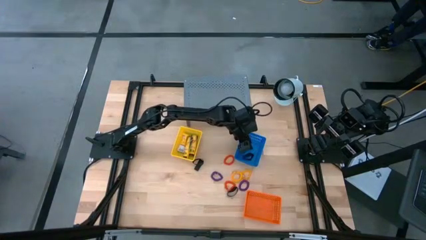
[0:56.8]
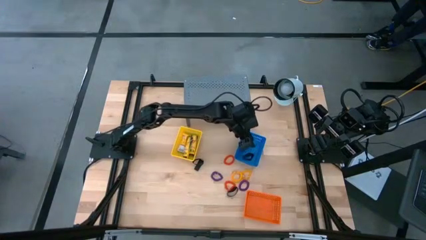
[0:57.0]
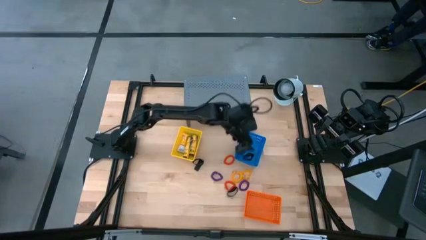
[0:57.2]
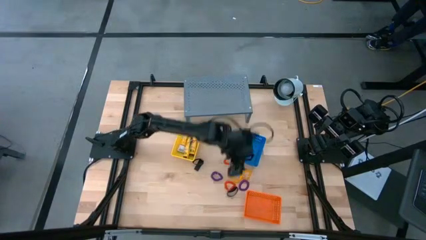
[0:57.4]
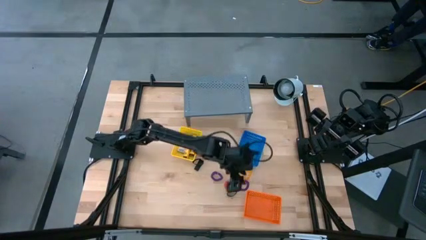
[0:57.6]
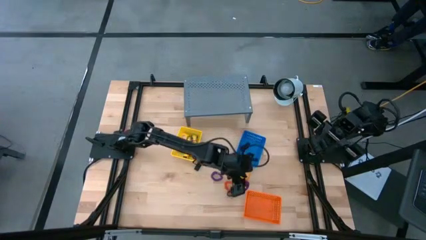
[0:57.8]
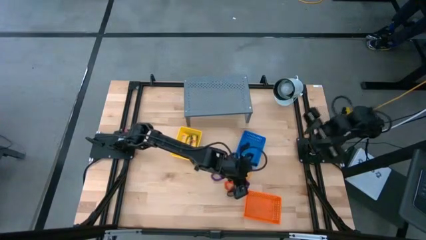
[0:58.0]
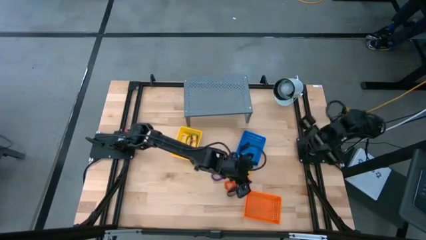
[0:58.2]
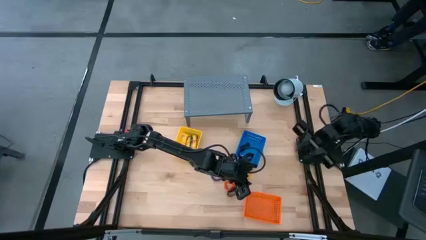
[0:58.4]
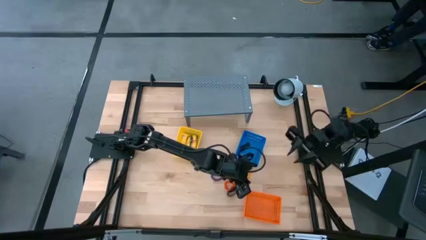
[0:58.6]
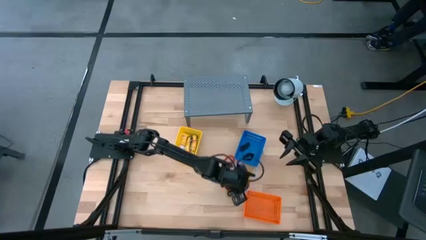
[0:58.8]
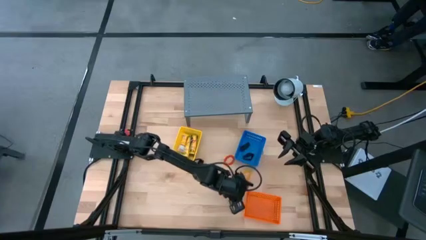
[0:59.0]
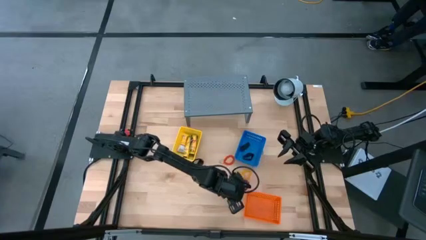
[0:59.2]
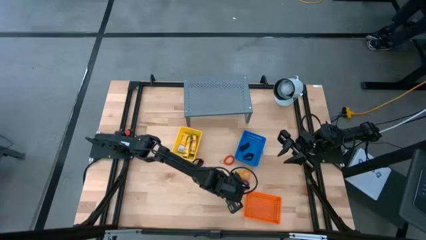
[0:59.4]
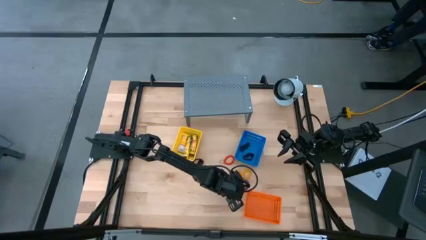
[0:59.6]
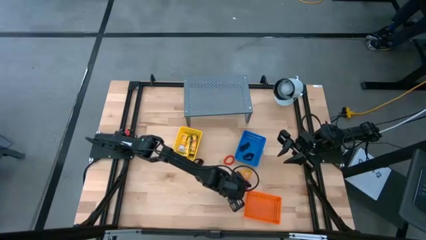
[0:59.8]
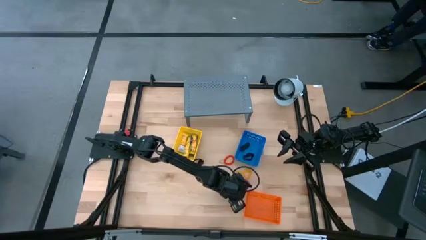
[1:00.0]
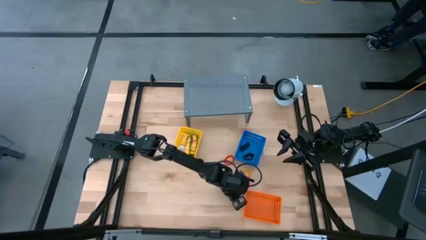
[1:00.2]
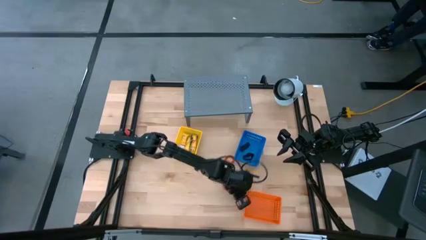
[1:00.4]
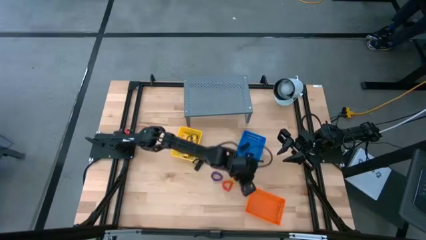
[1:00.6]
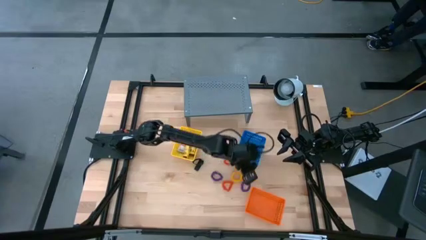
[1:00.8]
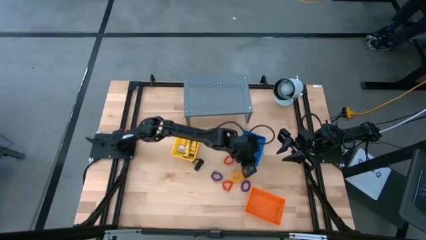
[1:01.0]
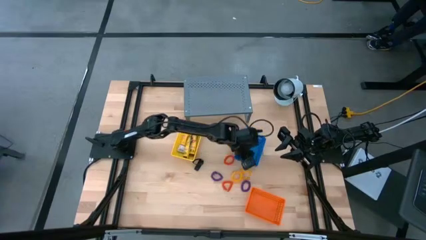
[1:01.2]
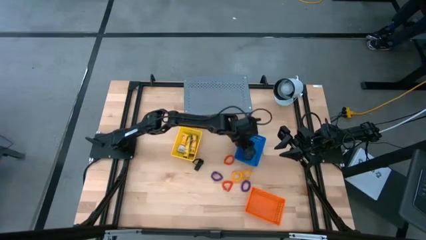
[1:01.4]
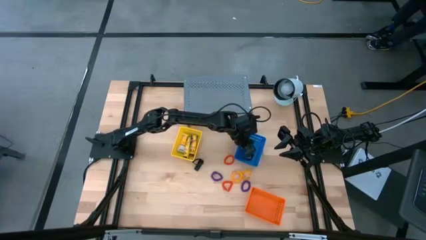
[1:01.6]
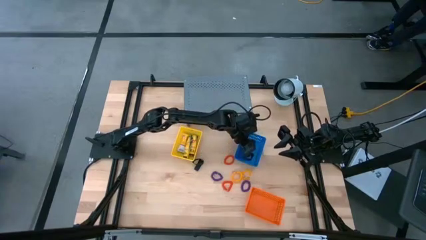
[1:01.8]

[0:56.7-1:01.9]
Task: Pick & Place Office Desk Supplies
Put the black rubber band into the blue bin

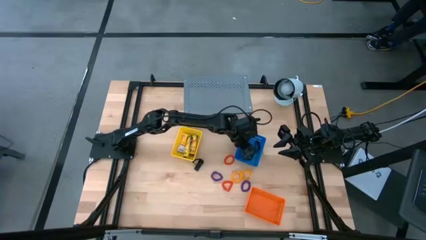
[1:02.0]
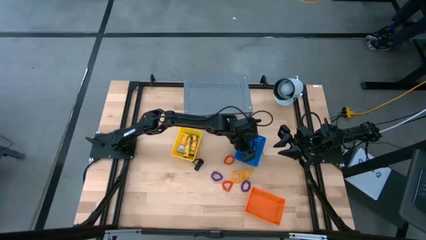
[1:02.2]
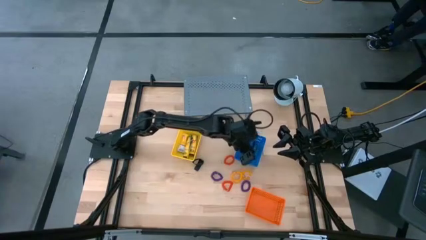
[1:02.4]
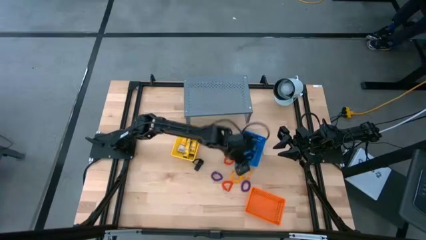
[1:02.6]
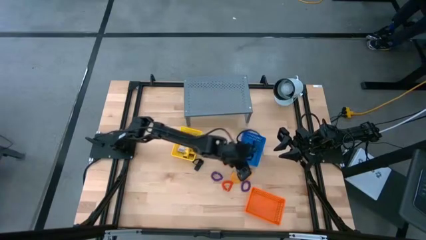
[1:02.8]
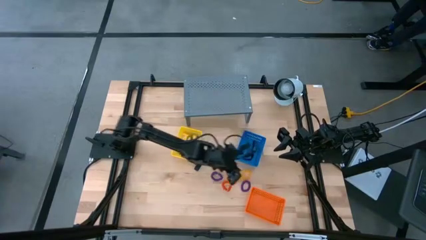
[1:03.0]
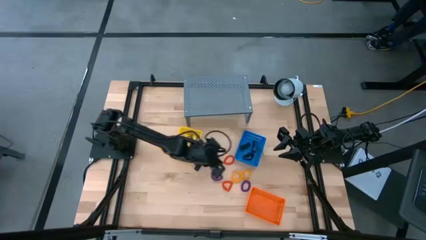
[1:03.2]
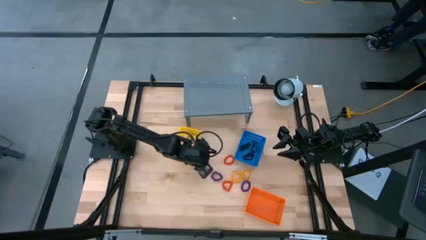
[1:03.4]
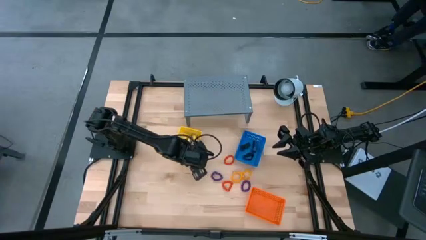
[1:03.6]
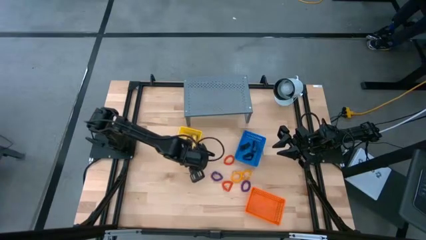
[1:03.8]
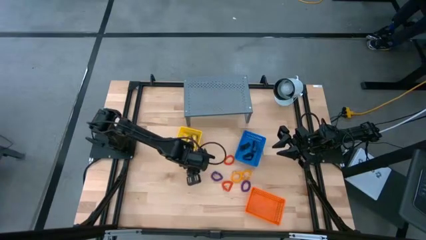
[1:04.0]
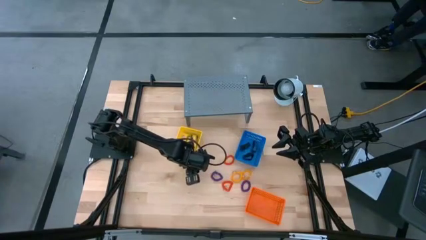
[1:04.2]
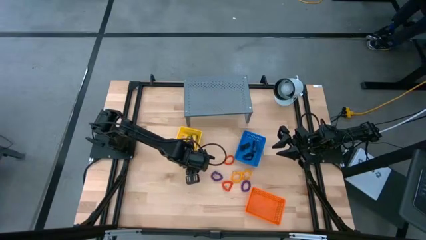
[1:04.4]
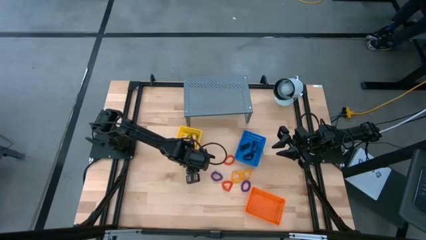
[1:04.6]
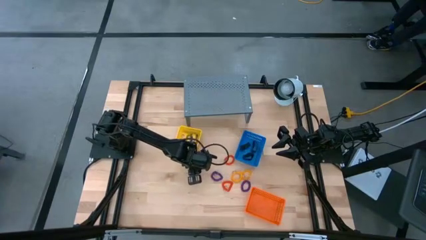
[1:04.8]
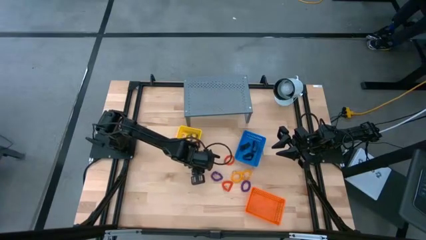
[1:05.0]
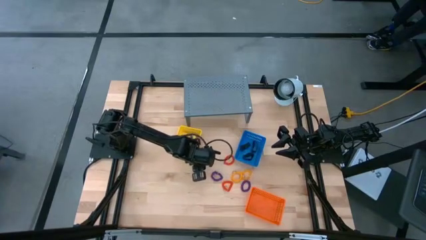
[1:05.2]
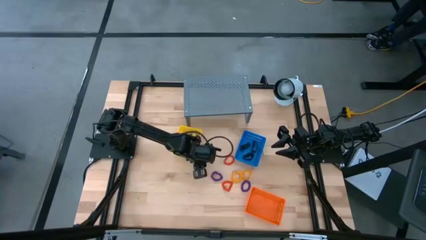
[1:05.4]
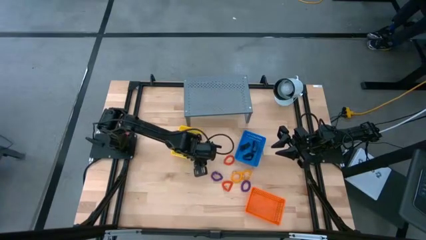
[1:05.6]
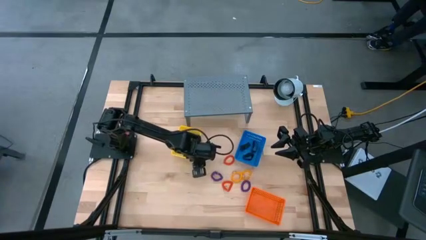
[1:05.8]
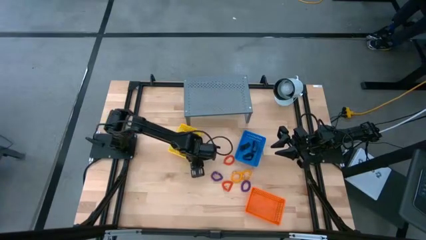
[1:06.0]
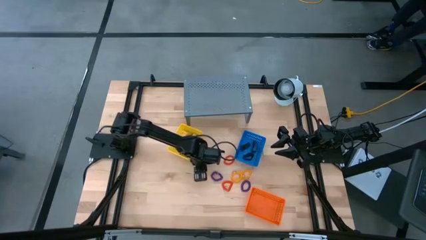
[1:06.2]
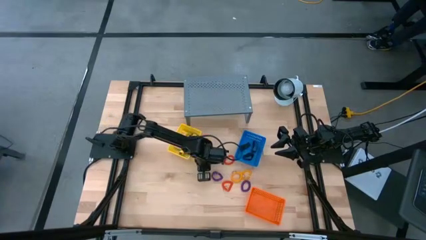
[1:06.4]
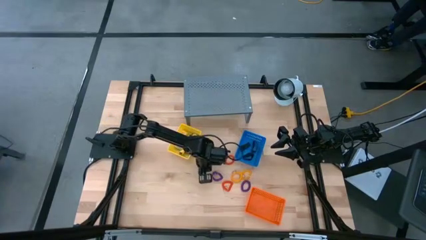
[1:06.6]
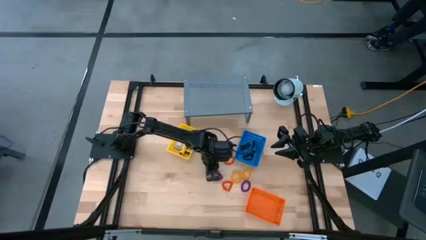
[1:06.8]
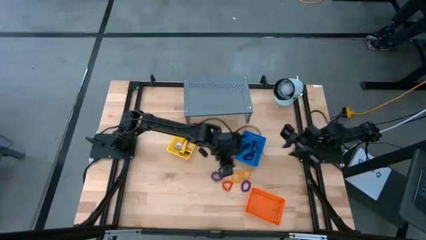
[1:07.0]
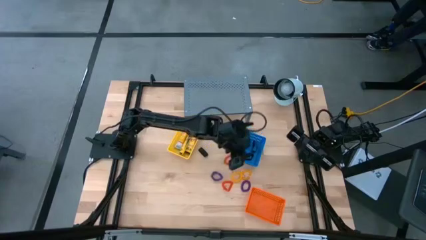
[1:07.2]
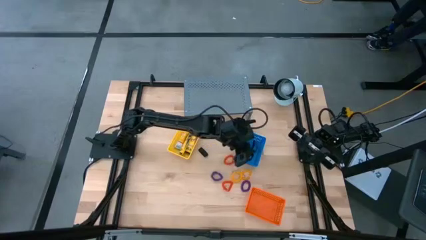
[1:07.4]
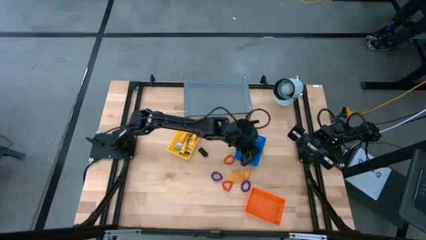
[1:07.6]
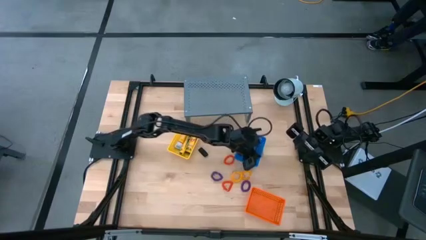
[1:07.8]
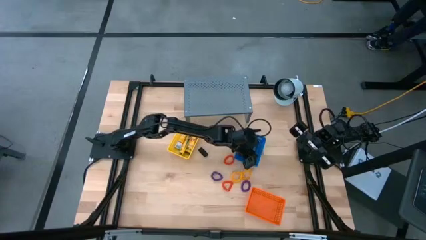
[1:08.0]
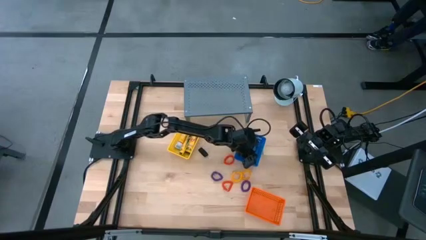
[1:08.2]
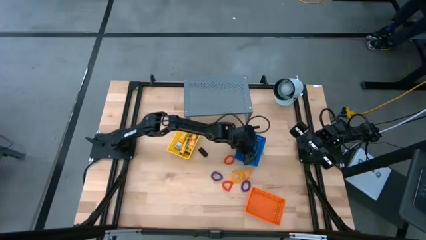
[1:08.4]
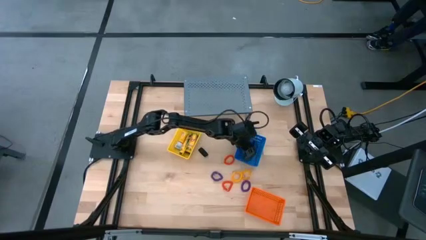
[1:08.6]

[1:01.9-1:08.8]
Put the black rubber band into the blue bin

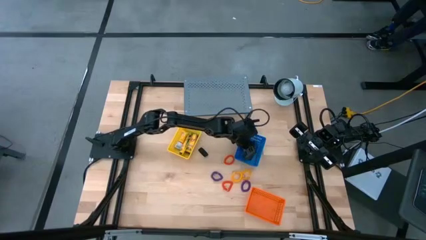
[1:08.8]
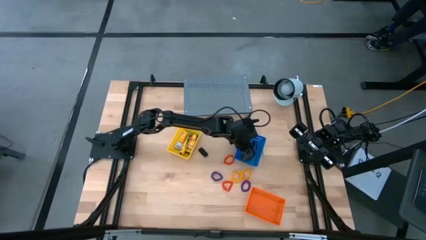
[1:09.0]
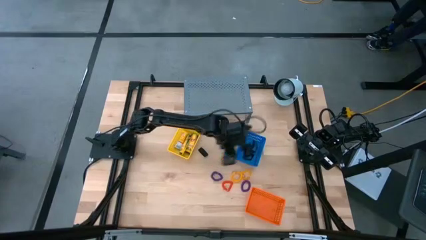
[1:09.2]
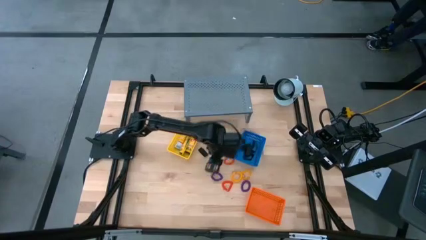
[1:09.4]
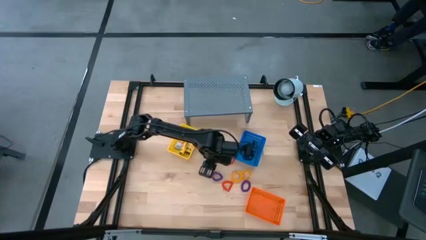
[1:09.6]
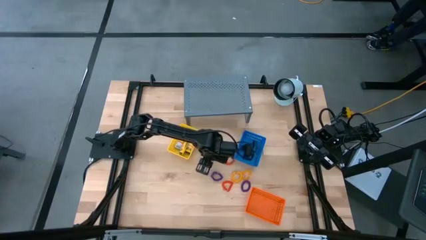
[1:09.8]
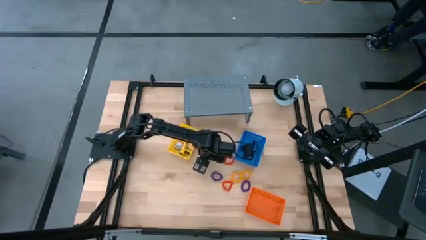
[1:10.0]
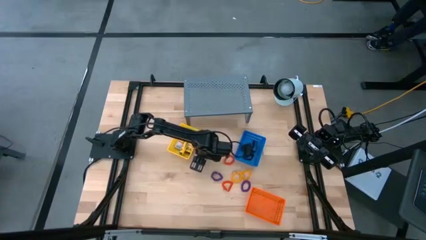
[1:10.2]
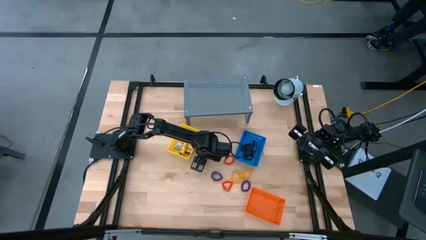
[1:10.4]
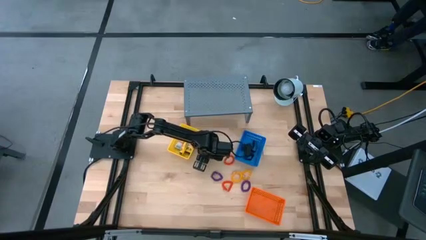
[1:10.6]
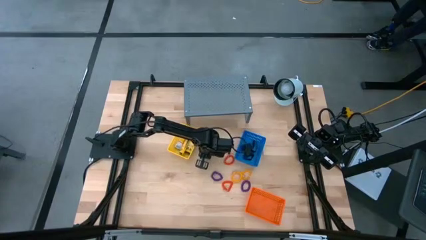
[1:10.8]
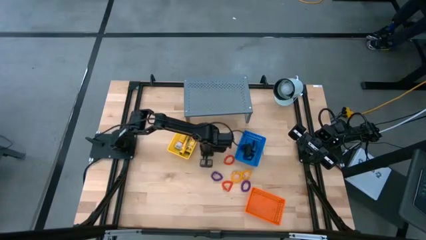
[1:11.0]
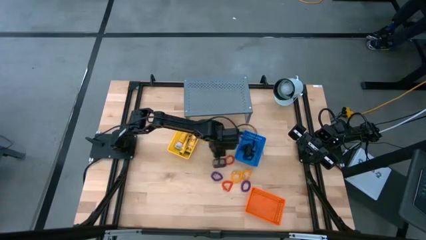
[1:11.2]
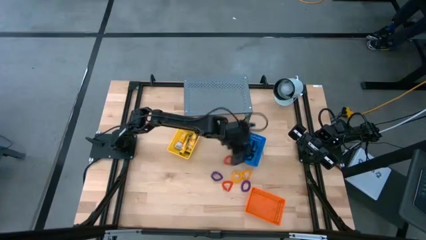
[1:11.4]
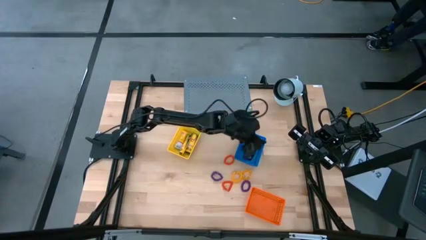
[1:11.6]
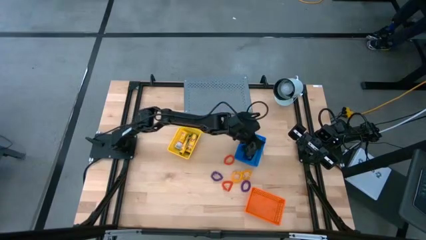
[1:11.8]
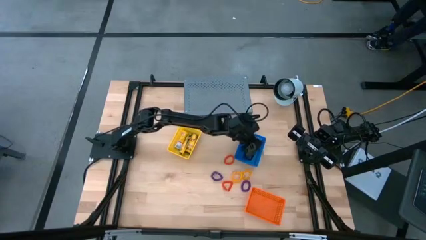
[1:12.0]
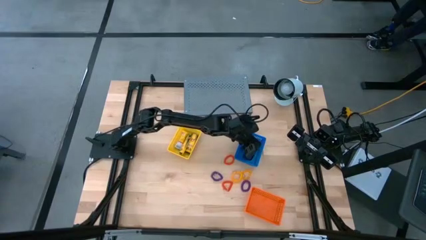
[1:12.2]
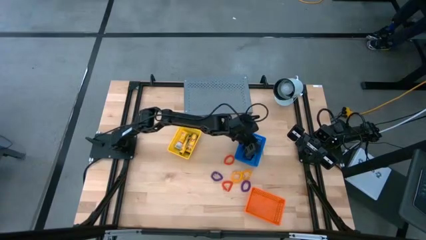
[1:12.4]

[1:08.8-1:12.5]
Put the black rubber band into the blue bin
